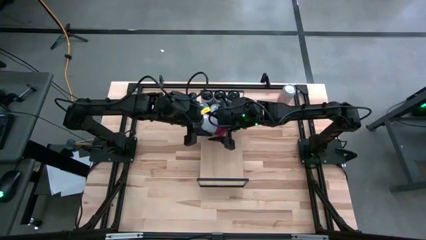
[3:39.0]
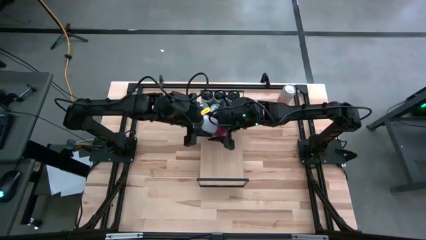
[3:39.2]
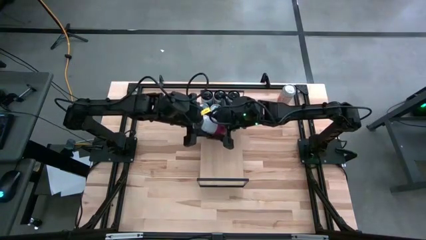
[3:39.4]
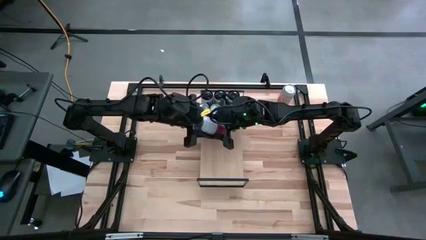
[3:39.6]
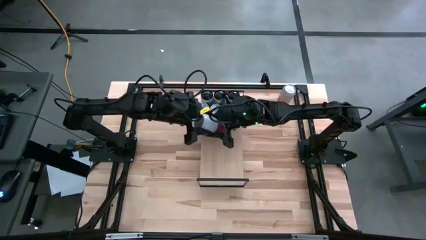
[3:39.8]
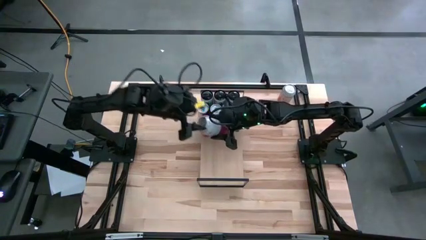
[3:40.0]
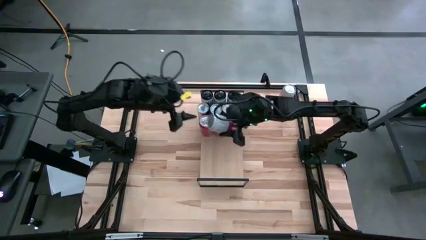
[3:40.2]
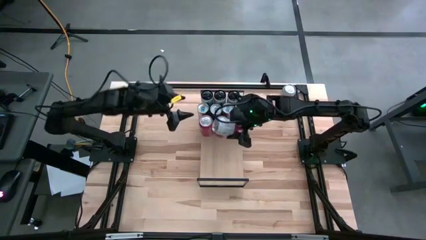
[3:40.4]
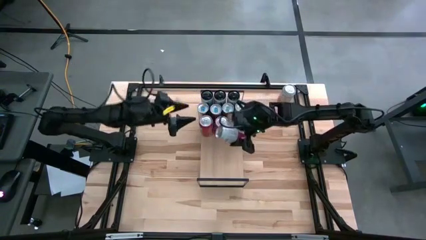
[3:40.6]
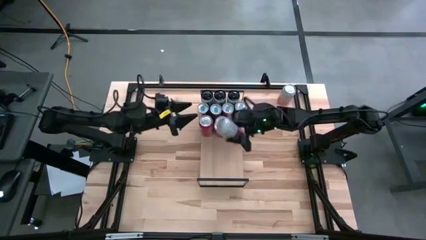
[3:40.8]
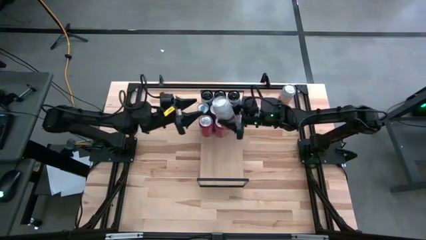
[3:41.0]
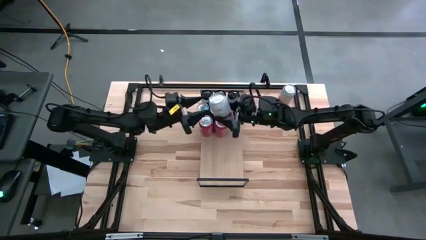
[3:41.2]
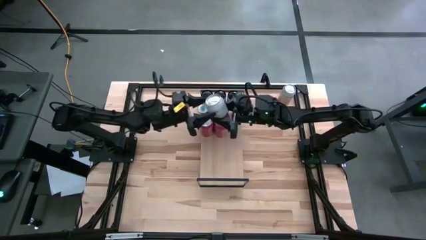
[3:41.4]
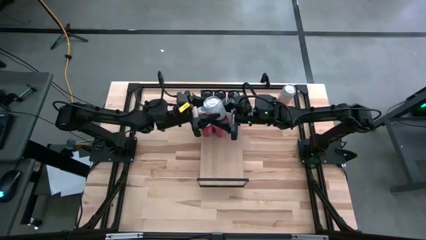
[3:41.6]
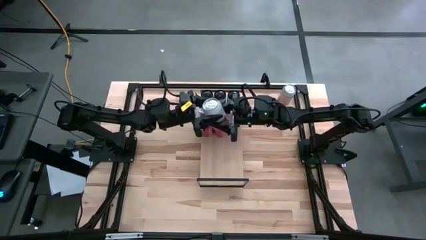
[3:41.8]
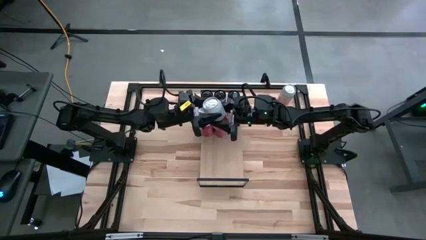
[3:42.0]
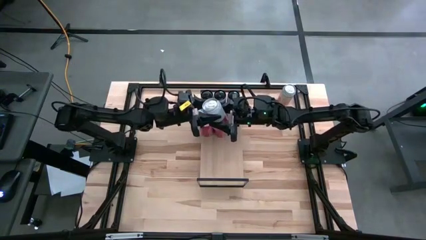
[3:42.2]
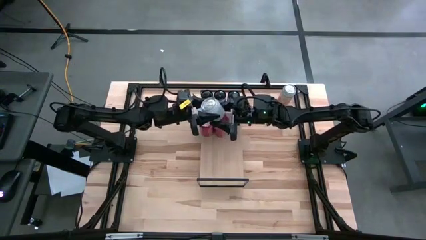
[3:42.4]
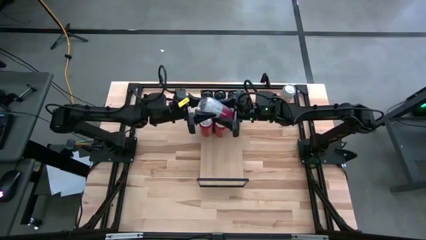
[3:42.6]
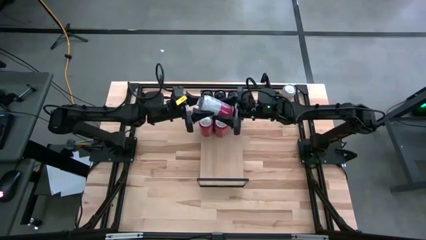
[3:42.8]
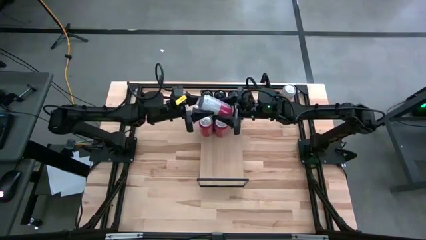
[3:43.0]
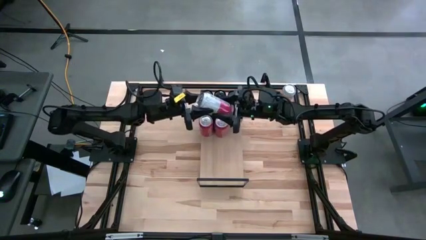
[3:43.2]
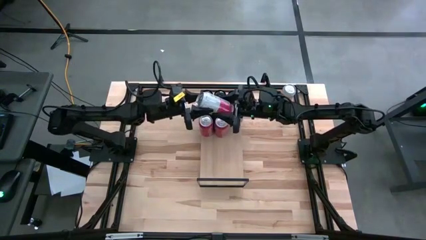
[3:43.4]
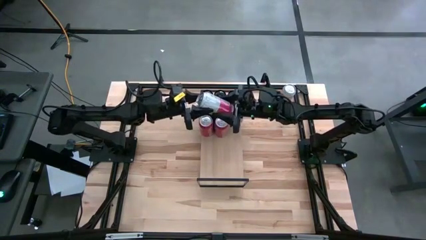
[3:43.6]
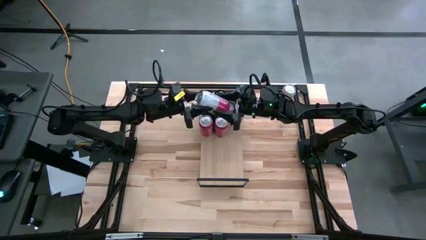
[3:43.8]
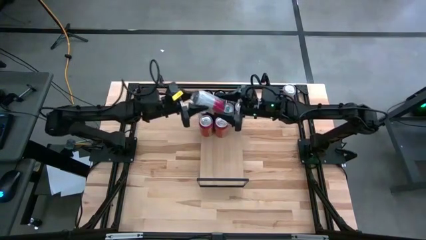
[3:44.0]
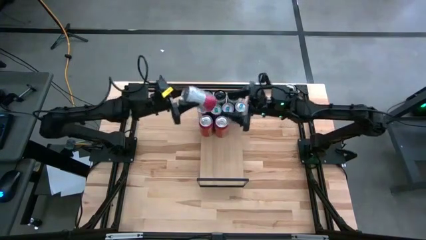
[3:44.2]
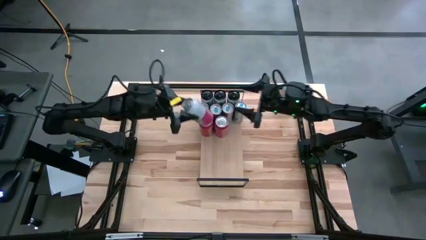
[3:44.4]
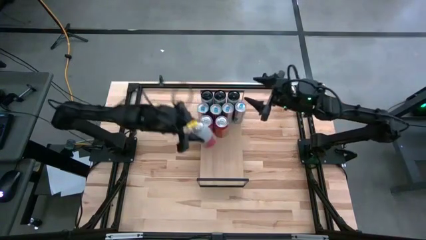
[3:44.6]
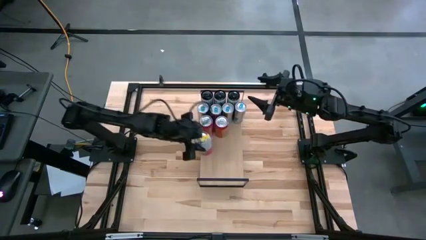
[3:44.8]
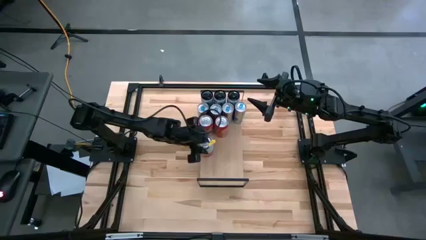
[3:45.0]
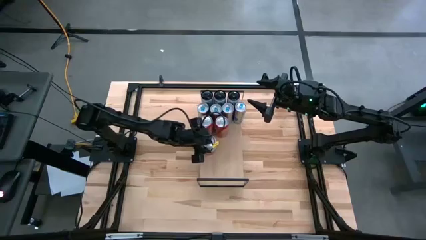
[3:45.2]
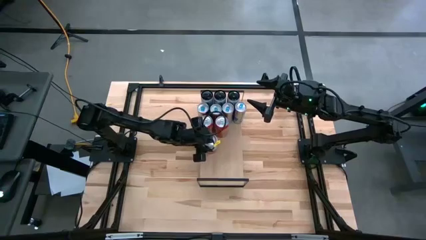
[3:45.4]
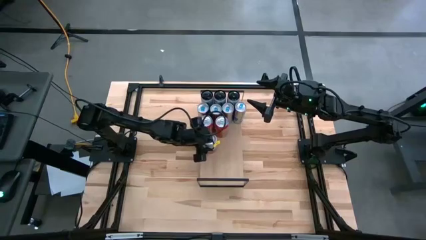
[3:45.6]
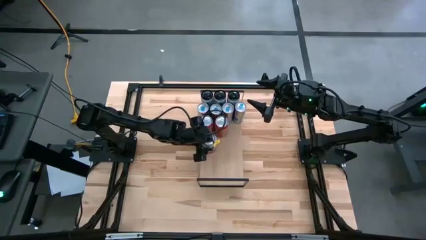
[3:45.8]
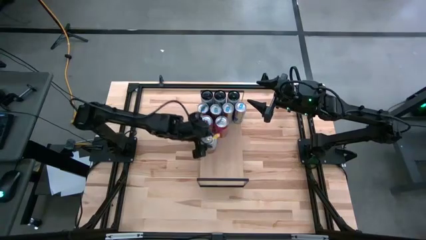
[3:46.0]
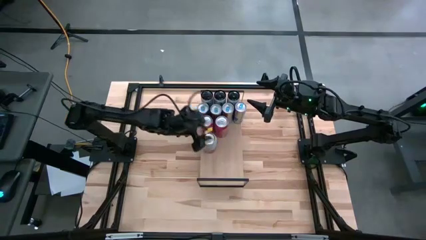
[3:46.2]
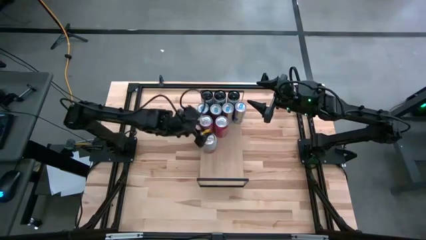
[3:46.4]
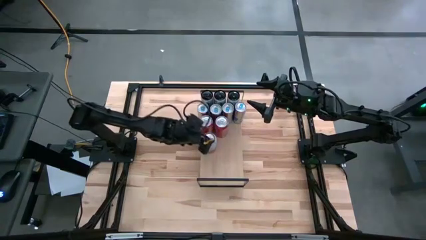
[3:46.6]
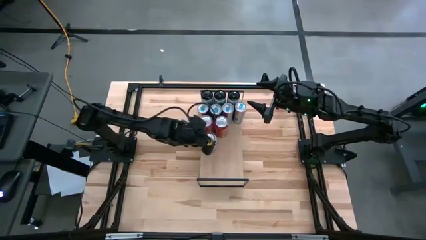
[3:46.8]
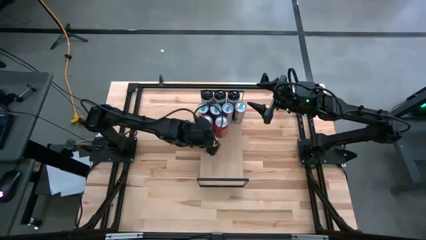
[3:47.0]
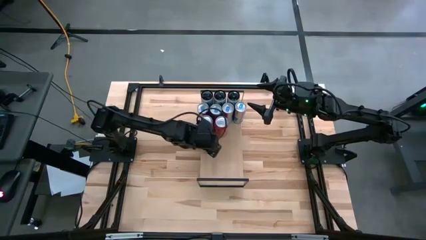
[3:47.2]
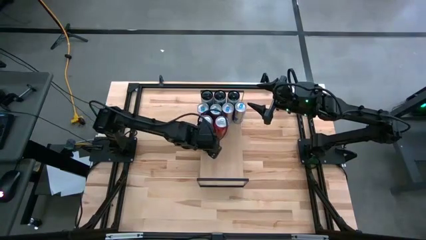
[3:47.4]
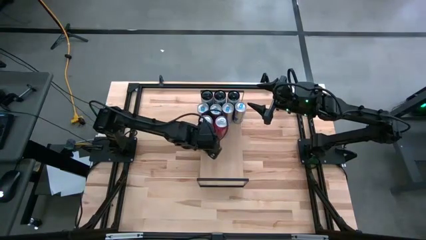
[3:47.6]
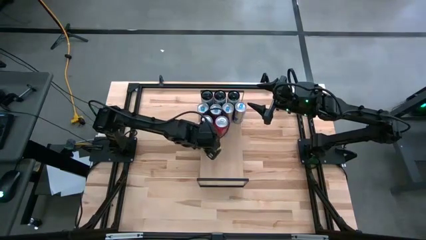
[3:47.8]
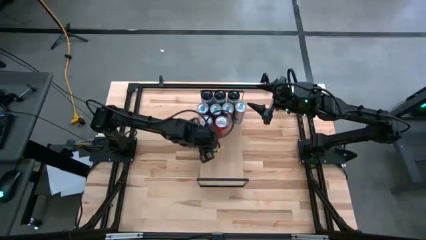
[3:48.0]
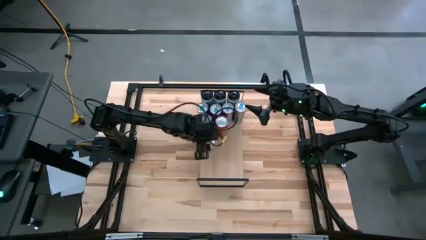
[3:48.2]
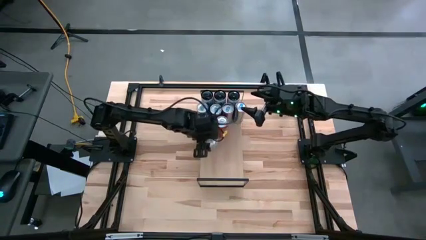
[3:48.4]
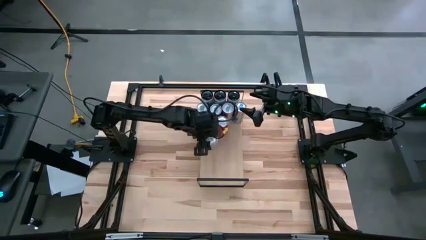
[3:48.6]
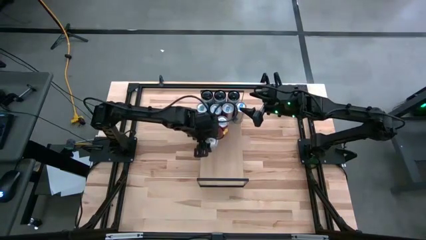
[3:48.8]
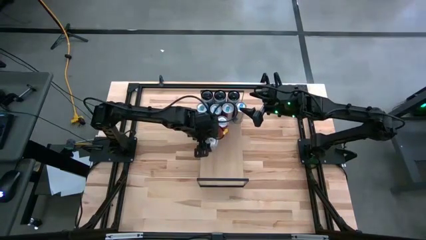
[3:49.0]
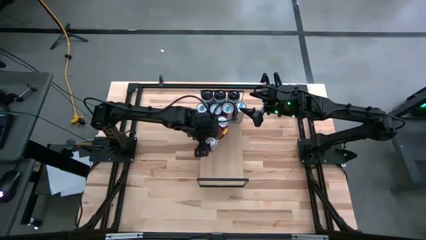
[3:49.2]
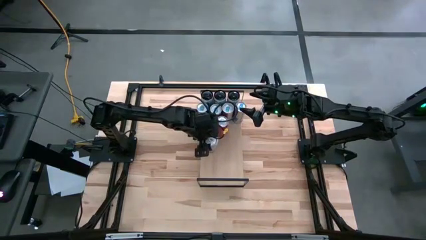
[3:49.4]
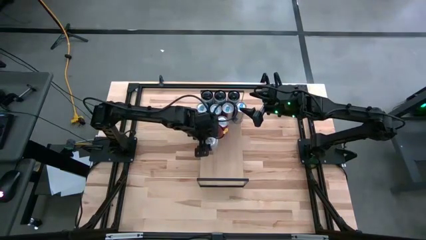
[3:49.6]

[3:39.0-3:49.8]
Task: Place canned beverage on shelf
Put the left pink-white soda can on the shelf

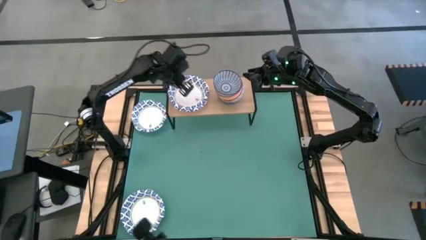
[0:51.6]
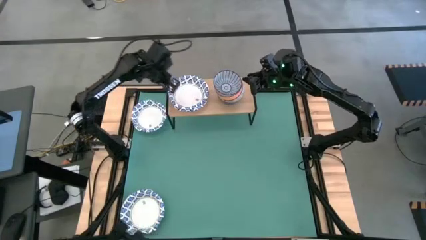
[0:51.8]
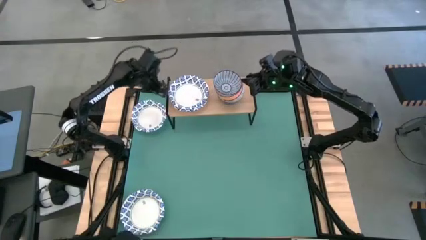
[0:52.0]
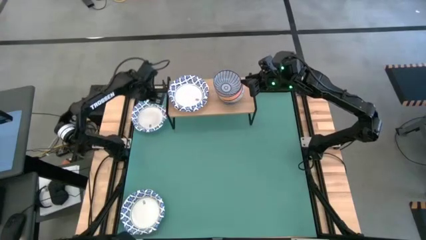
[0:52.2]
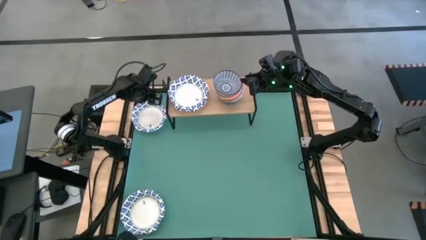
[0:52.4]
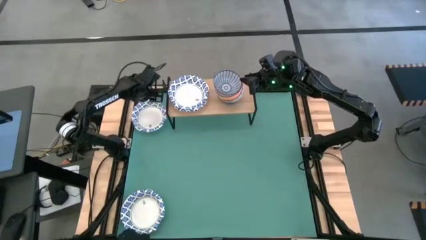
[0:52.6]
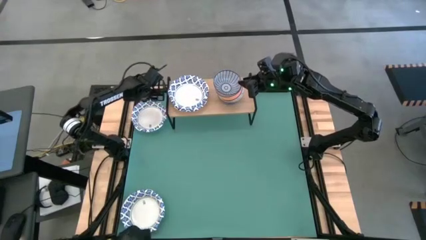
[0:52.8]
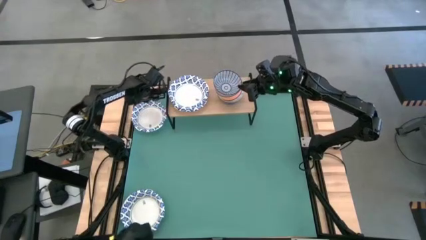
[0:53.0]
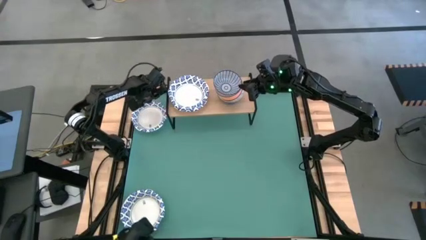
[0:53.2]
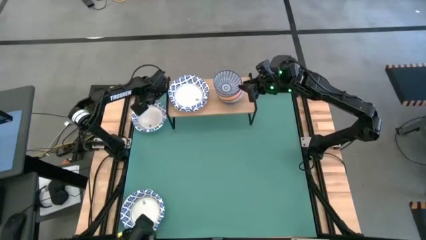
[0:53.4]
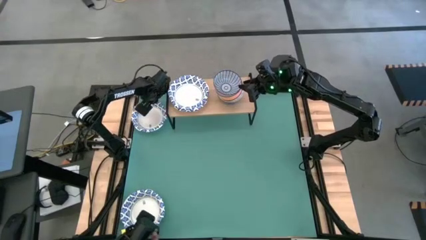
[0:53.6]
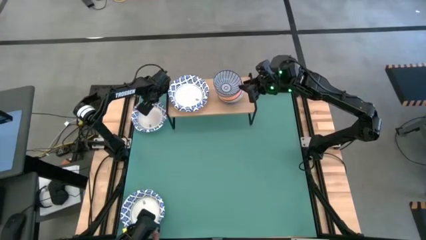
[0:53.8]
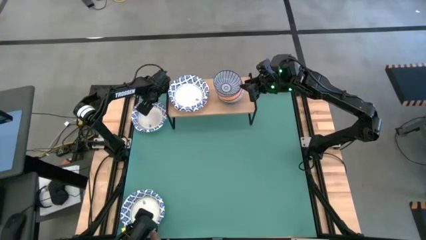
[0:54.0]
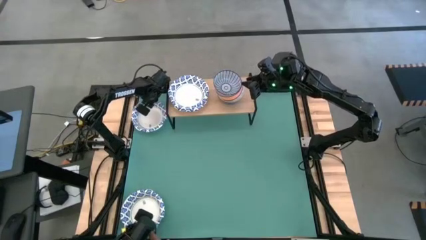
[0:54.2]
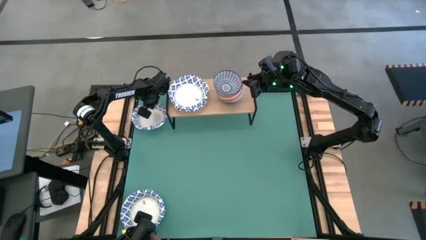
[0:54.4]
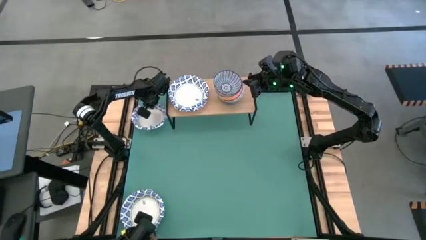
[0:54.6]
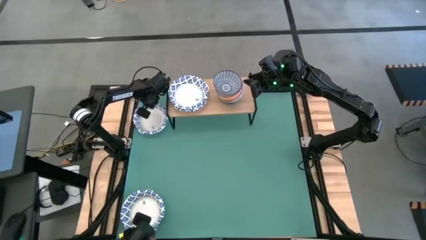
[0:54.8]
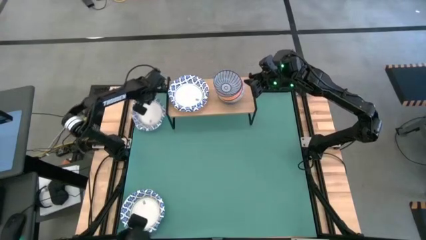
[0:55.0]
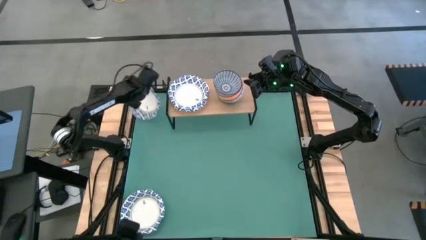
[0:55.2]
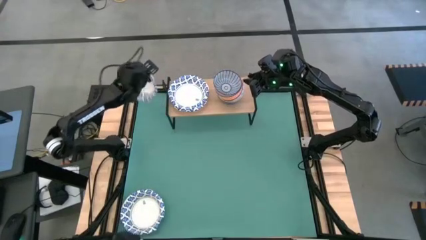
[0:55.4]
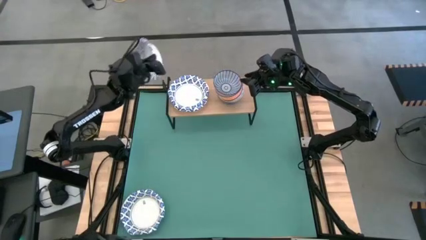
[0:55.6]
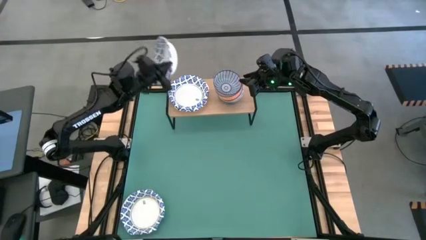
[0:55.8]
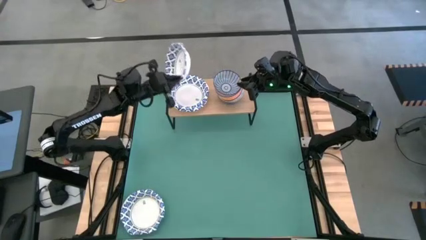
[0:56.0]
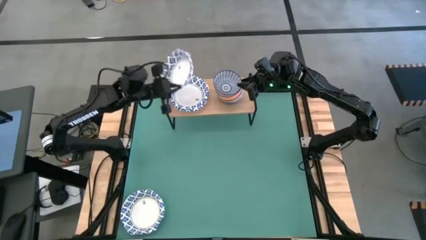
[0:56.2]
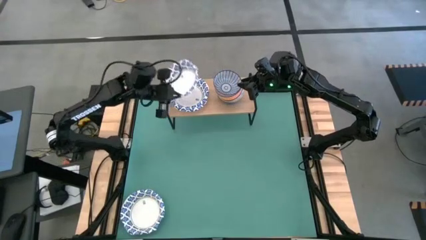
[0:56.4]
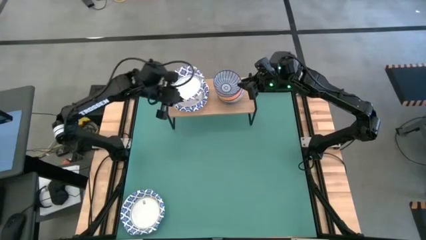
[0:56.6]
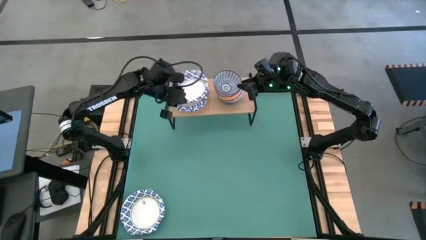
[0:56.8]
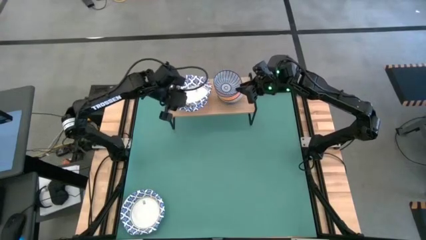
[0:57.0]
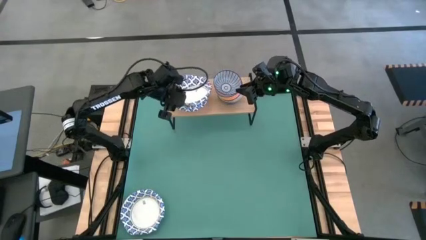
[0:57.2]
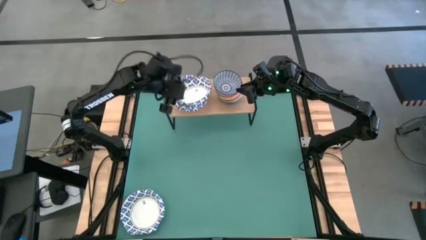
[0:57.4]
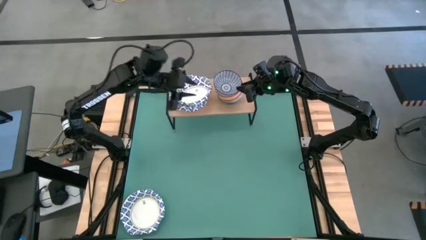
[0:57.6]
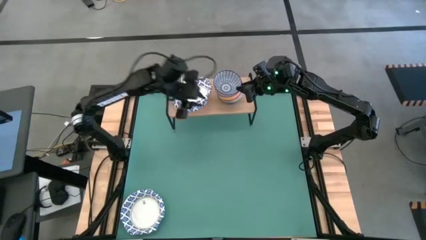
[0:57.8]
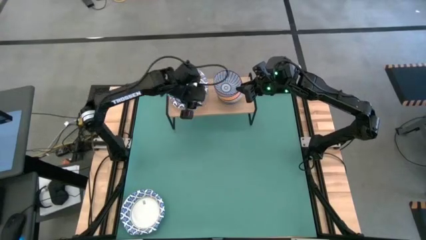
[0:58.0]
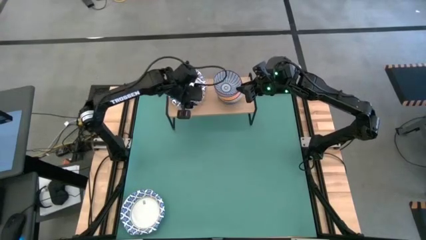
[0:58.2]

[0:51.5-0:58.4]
Task: Place and stack bowls onto a shelf
Stack the large white bowl on the stacked large white bowl on the shelf
